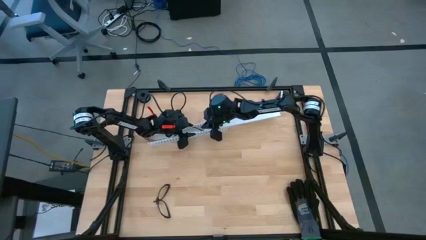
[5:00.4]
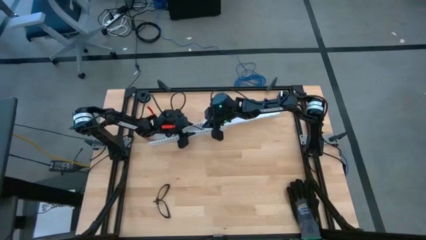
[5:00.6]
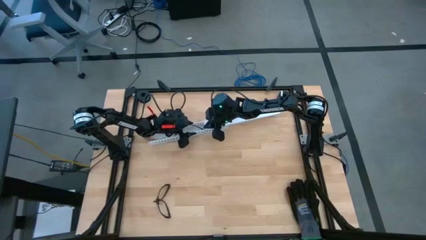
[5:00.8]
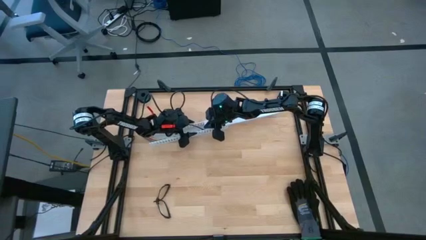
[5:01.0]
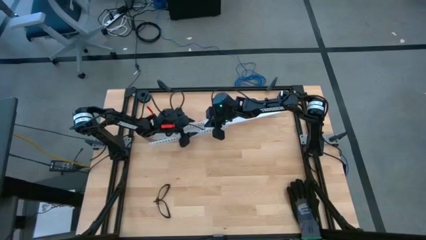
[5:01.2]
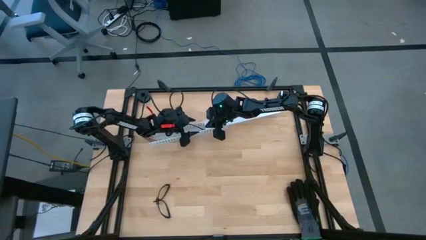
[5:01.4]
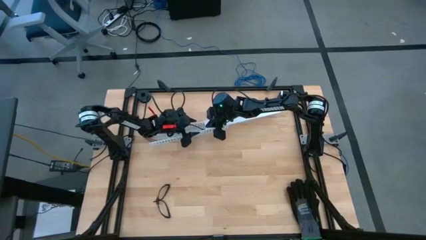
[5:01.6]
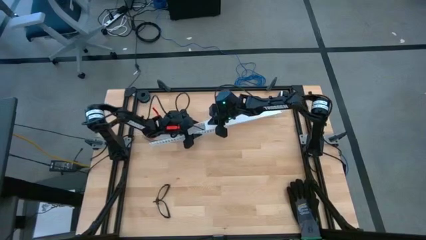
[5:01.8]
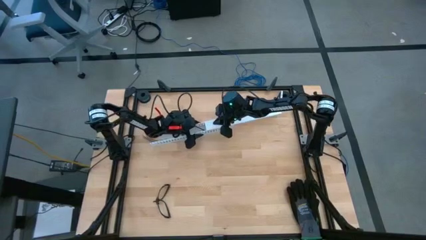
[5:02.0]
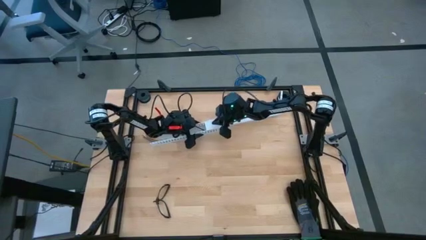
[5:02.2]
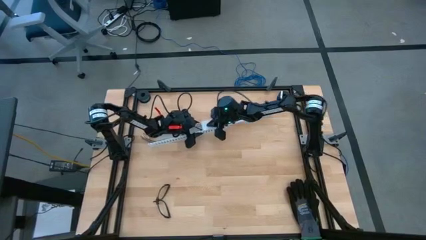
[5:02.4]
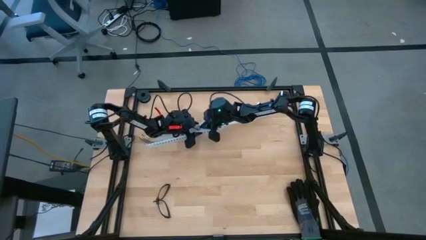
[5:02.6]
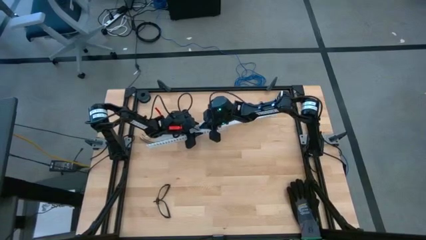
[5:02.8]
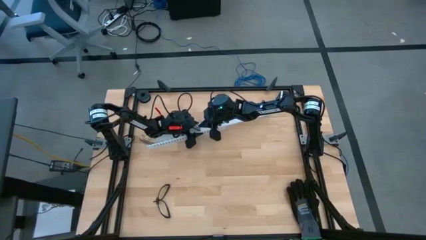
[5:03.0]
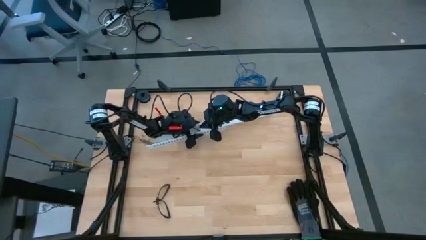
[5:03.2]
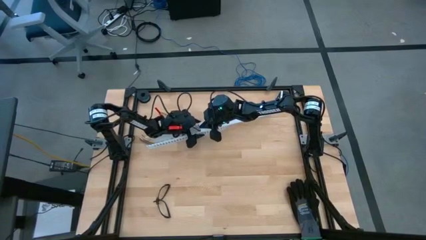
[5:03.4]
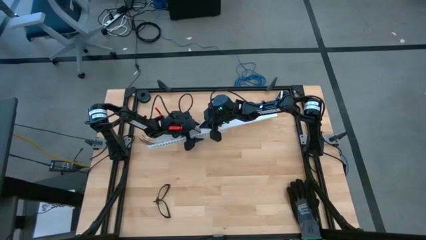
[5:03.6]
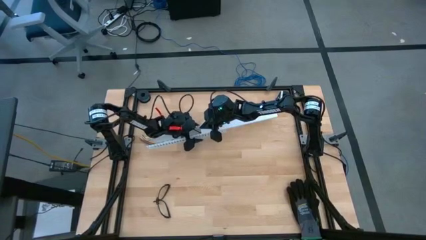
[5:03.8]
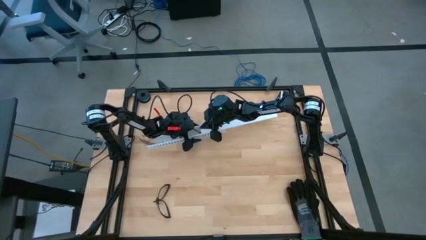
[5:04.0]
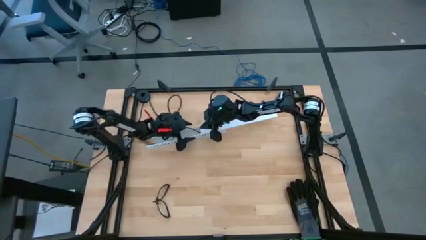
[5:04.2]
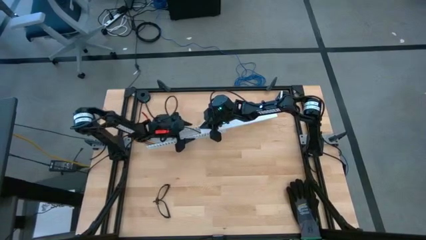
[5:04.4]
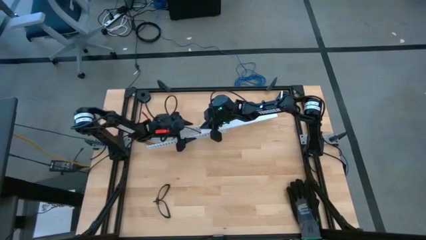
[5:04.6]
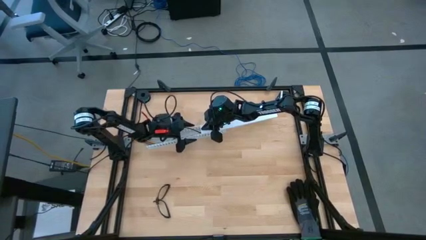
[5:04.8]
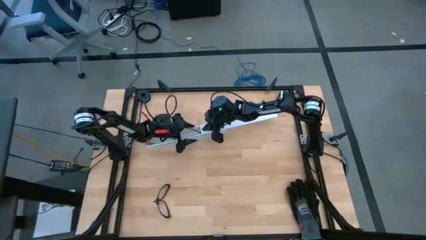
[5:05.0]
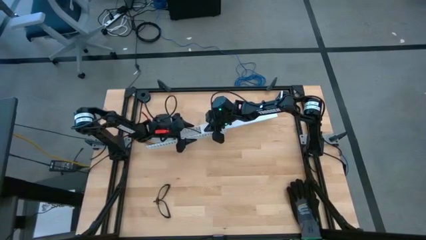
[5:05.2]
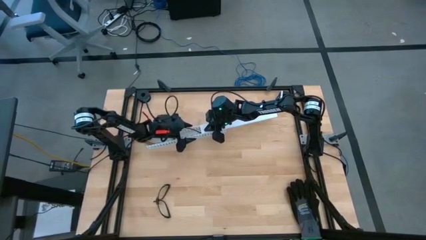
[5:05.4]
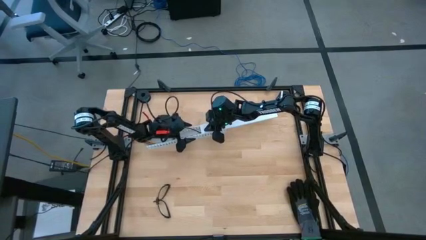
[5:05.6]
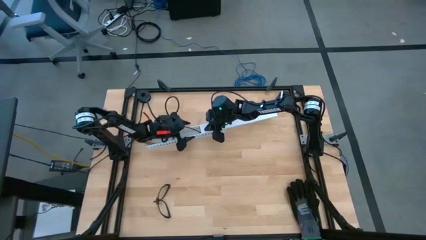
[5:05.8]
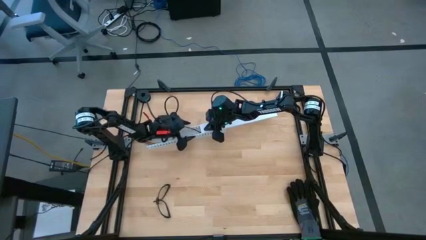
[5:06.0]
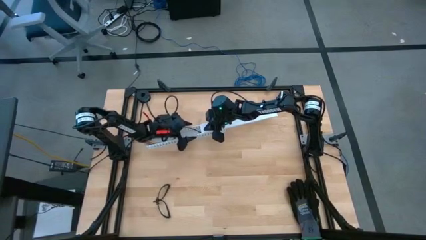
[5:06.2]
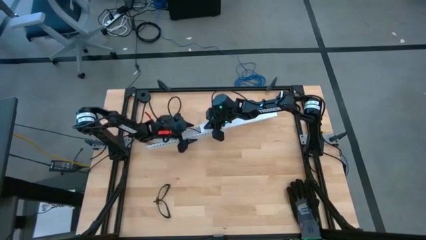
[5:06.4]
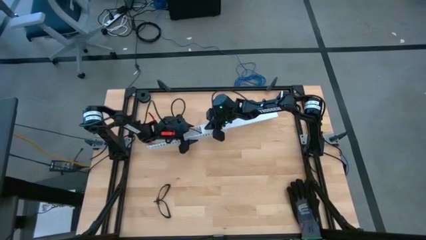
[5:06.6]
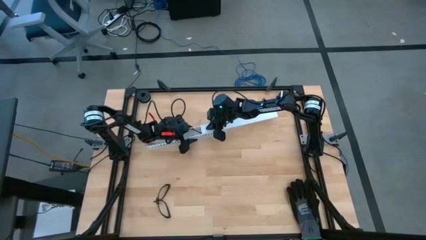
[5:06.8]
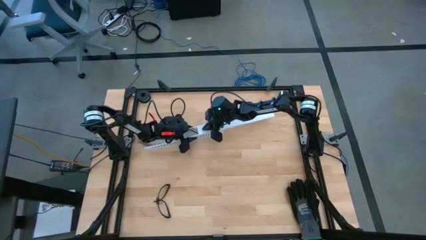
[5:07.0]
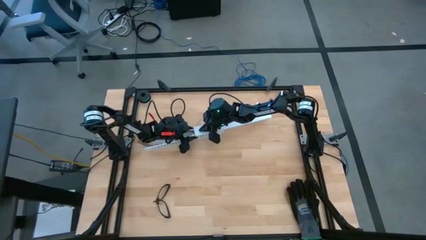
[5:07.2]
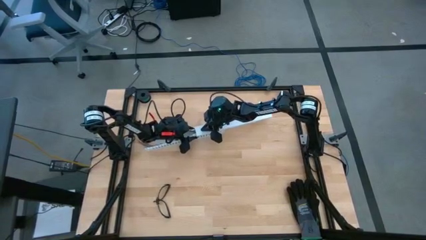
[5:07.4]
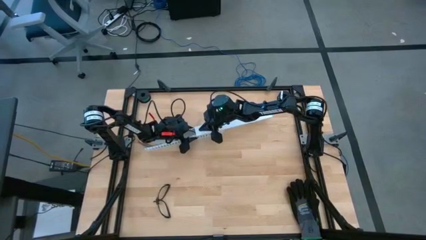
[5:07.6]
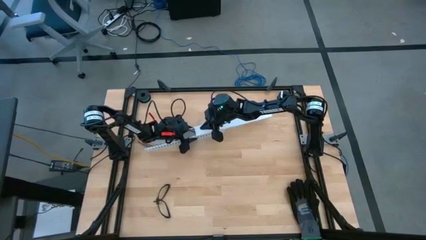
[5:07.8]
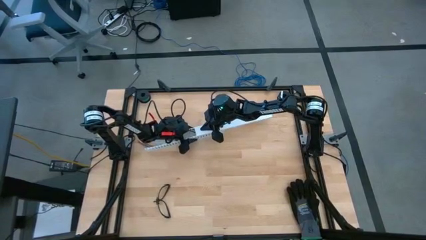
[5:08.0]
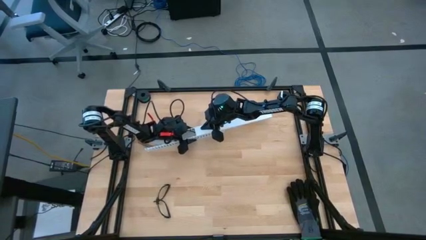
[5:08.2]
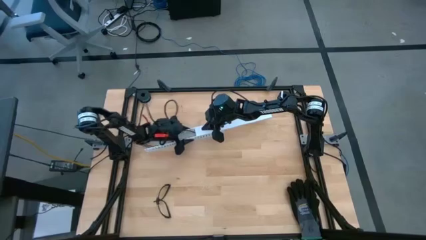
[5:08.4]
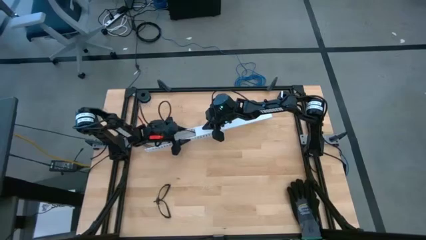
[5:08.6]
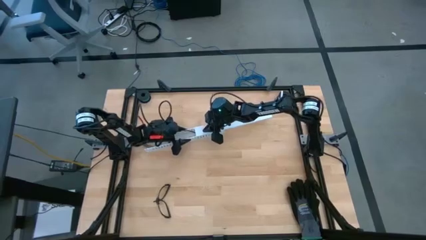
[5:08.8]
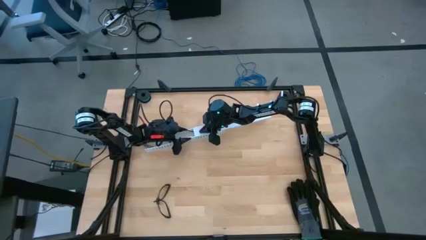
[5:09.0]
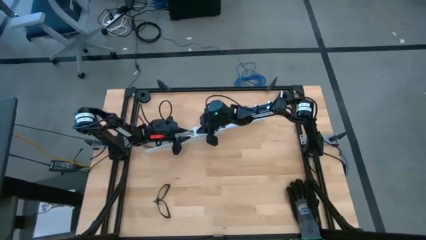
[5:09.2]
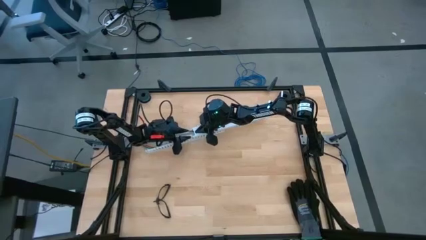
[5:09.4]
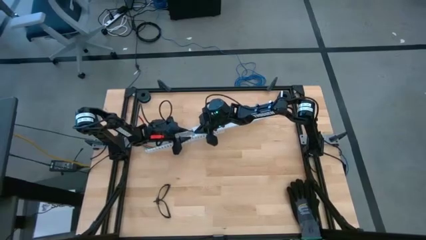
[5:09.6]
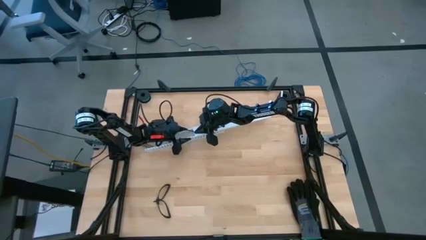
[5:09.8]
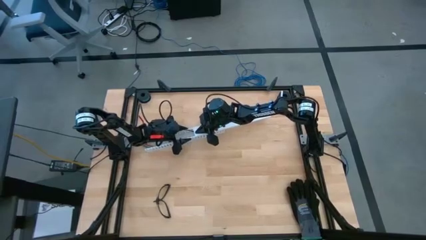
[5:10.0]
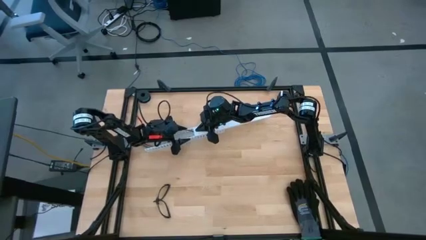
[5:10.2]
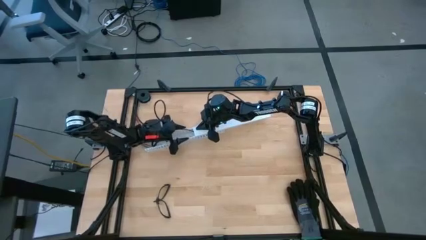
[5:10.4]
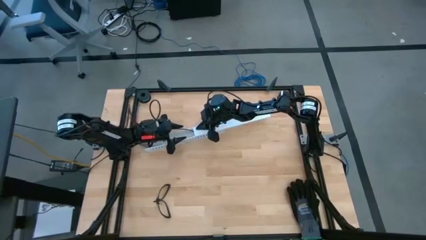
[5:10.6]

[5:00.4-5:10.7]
Task: Ziptie cables
Close the white cable duct lid

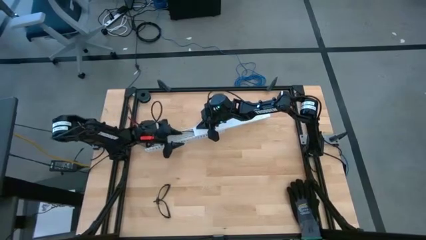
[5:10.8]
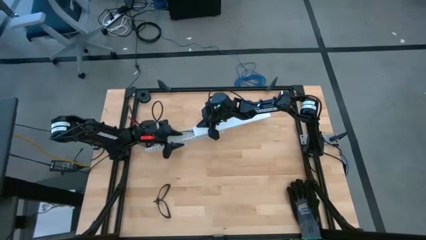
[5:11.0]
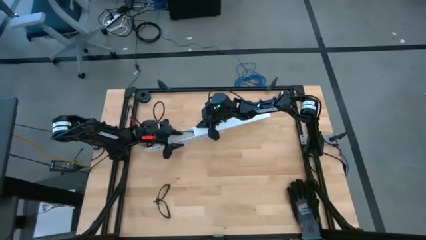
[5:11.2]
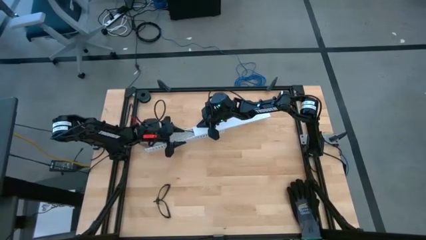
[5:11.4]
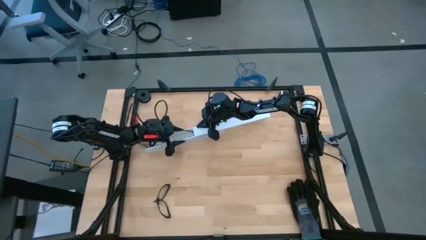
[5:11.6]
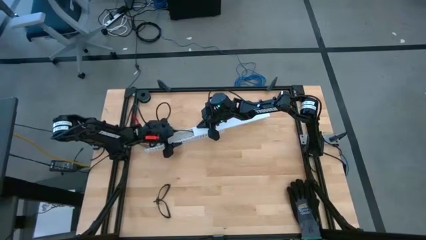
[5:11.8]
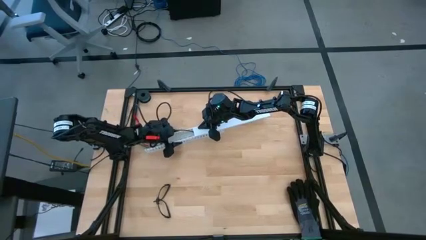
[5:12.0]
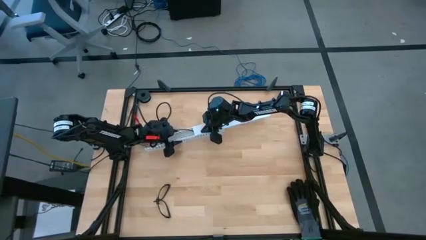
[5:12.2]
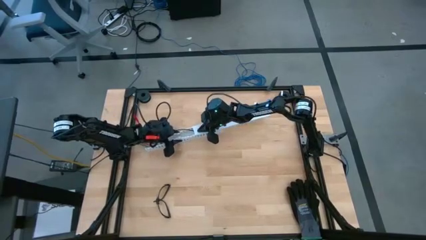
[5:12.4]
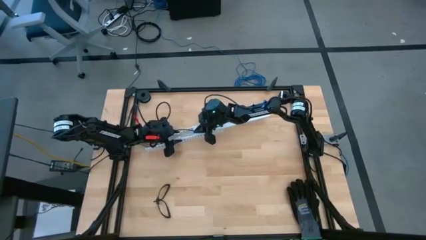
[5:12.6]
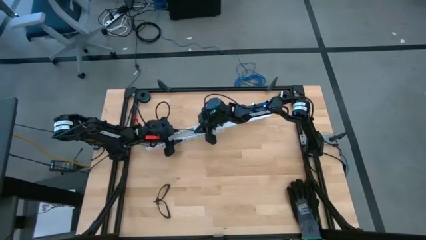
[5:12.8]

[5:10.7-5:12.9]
Close the white cable duct lid

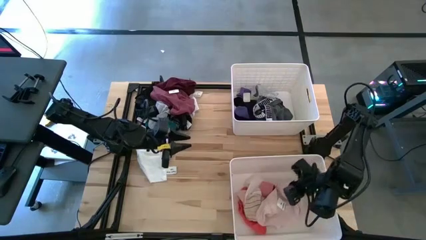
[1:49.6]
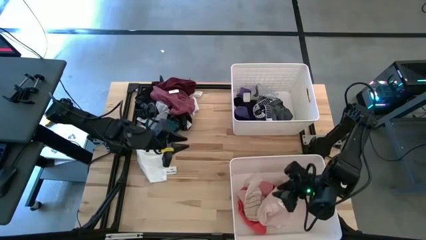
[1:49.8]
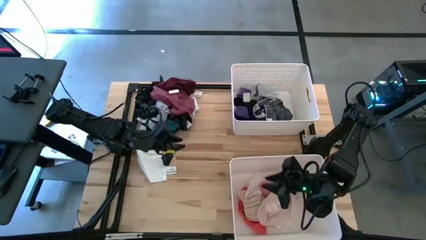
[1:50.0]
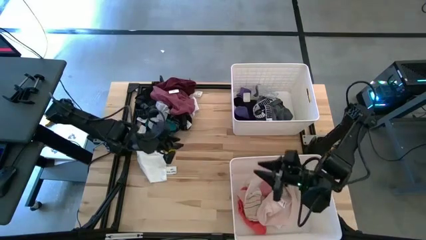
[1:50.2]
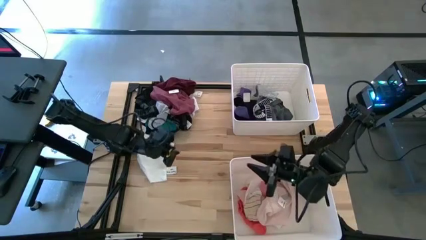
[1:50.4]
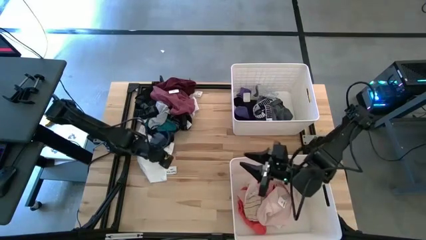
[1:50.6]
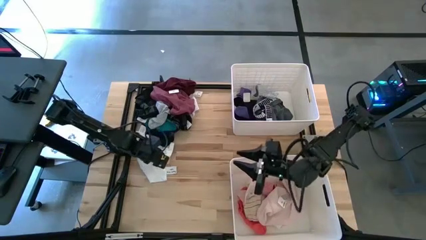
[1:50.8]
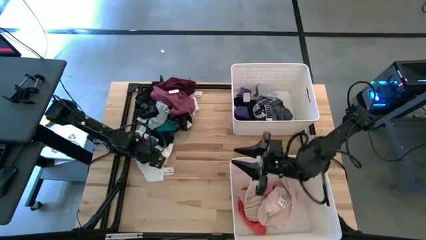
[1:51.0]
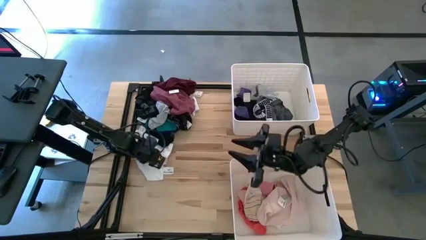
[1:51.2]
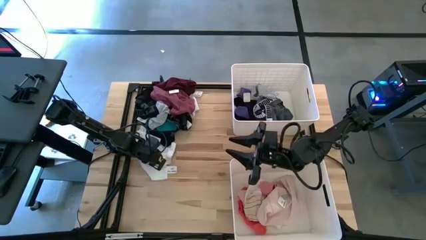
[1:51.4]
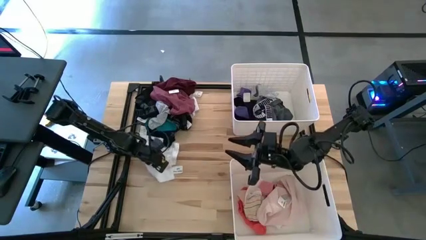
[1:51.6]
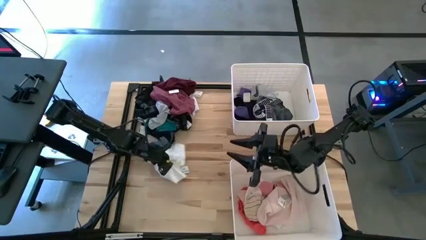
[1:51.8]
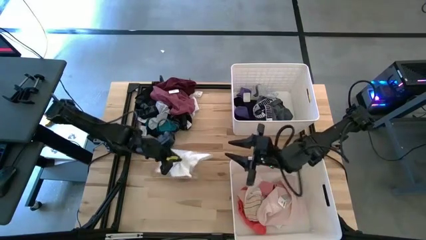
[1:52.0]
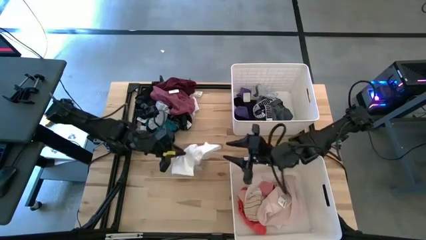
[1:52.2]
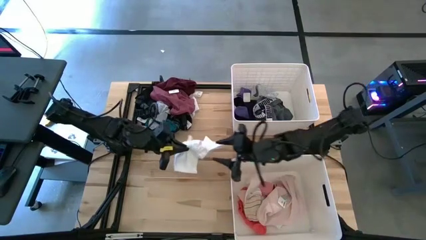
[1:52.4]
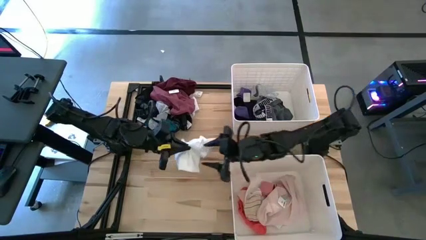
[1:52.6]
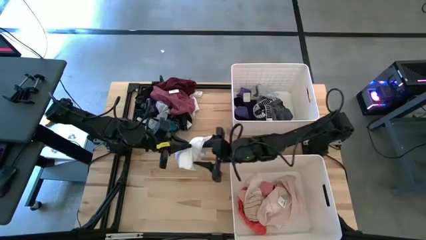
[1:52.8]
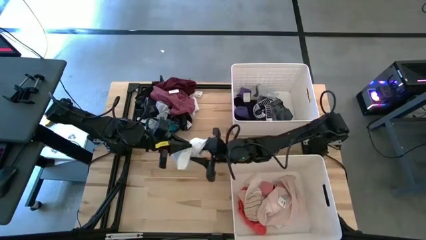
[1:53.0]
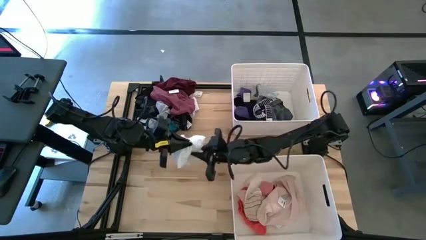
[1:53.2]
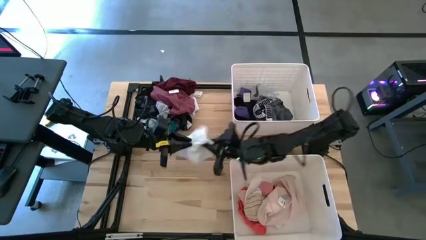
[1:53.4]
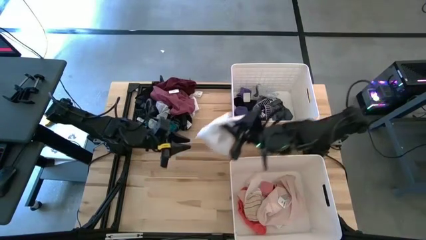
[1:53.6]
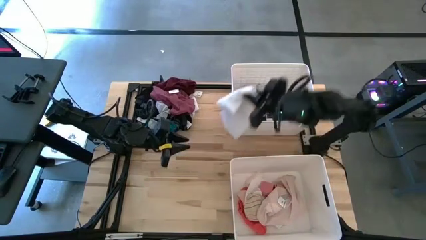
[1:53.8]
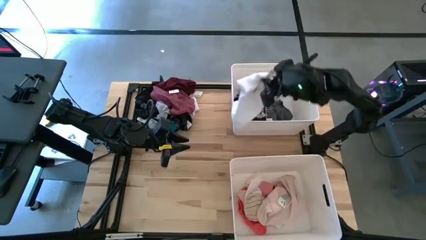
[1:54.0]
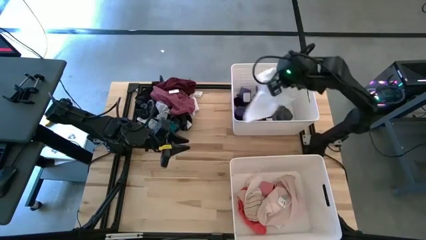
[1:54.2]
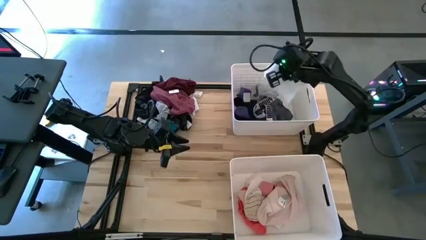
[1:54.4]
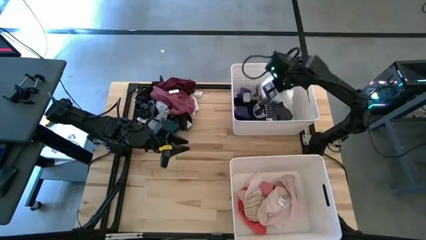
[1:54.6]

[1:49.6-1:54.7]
Task: Sort clothes
Put the white shirt into the top bin
